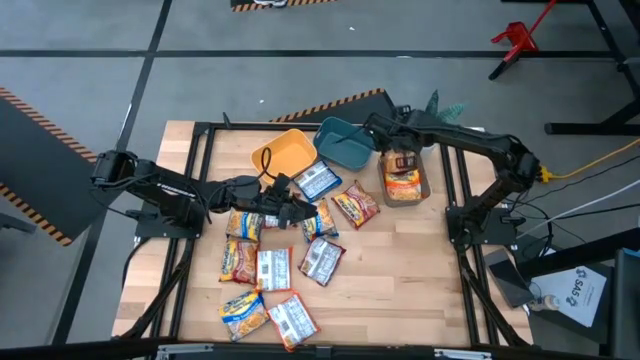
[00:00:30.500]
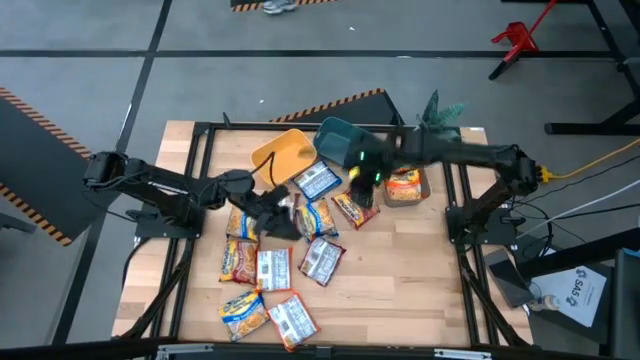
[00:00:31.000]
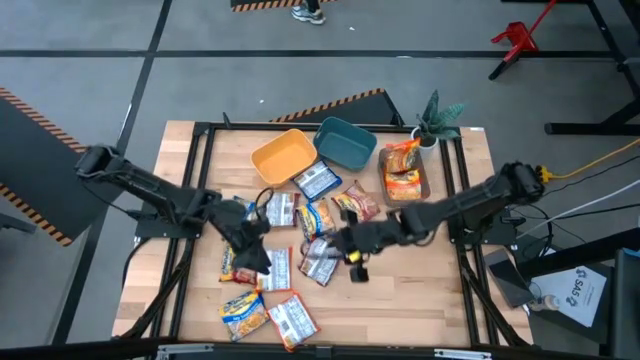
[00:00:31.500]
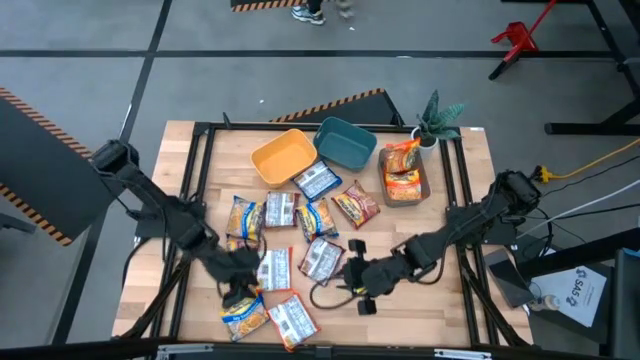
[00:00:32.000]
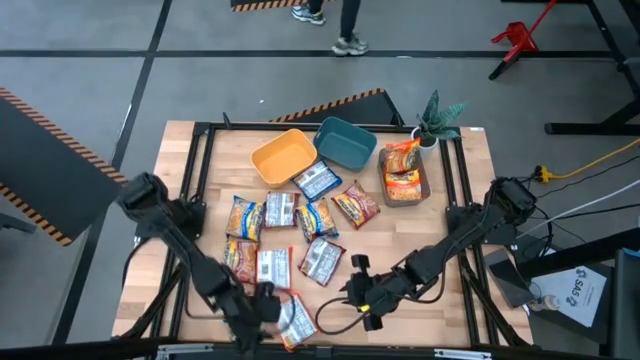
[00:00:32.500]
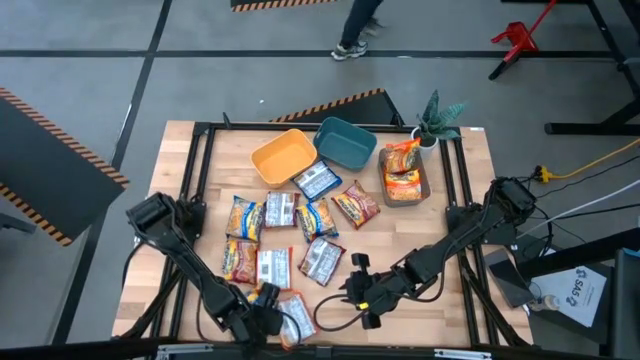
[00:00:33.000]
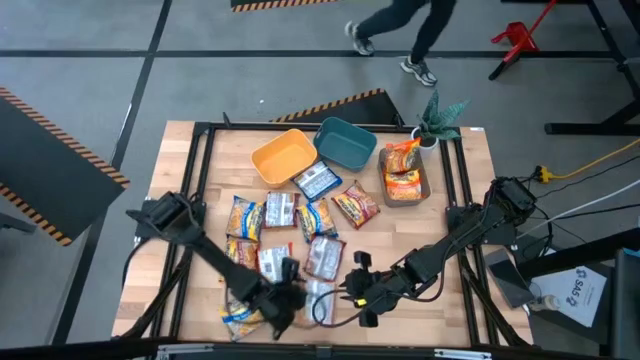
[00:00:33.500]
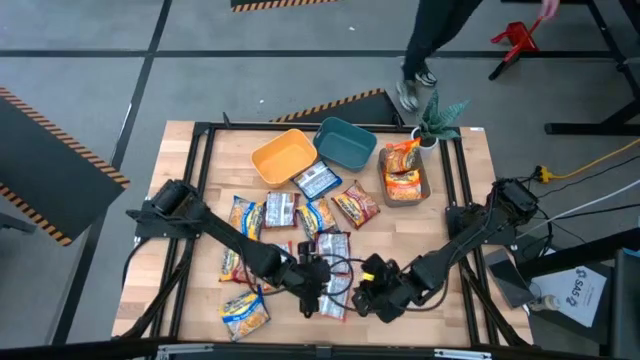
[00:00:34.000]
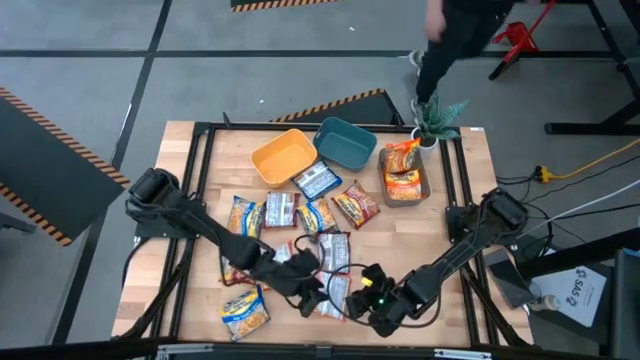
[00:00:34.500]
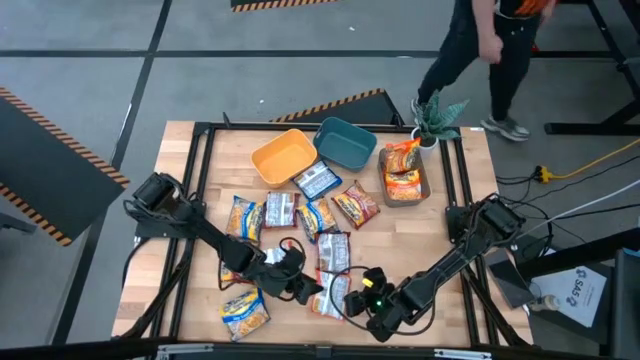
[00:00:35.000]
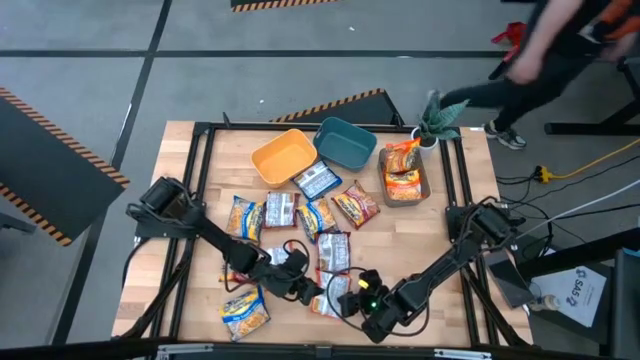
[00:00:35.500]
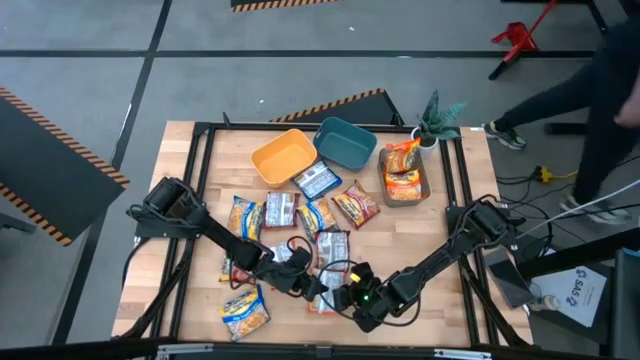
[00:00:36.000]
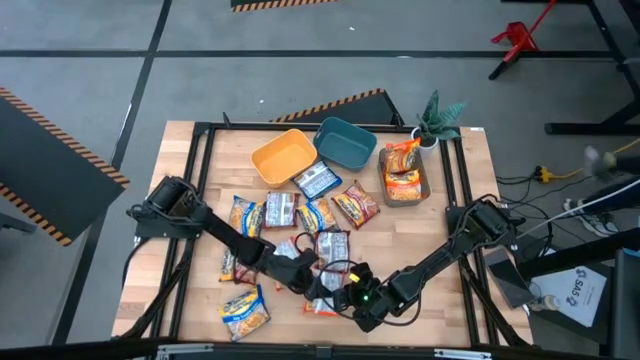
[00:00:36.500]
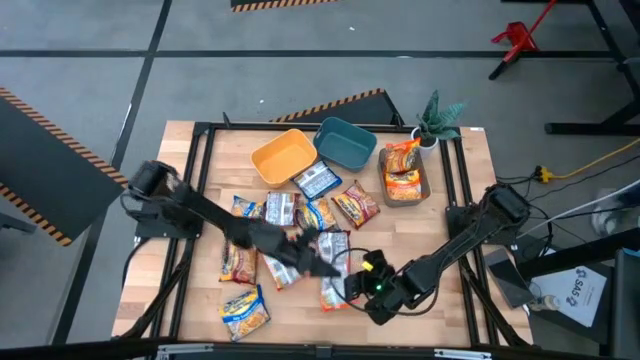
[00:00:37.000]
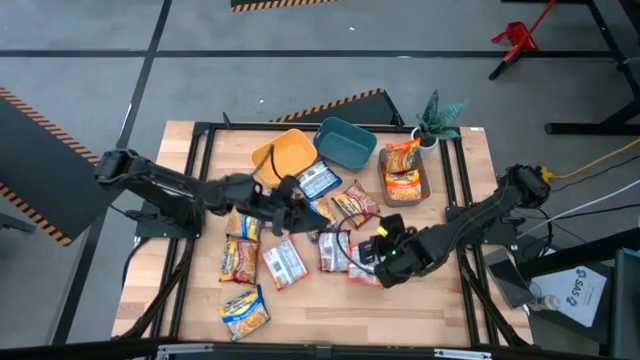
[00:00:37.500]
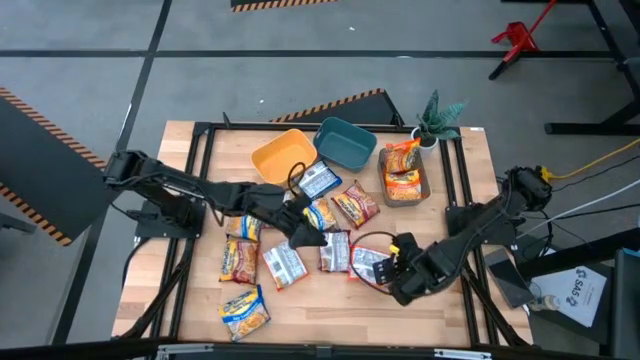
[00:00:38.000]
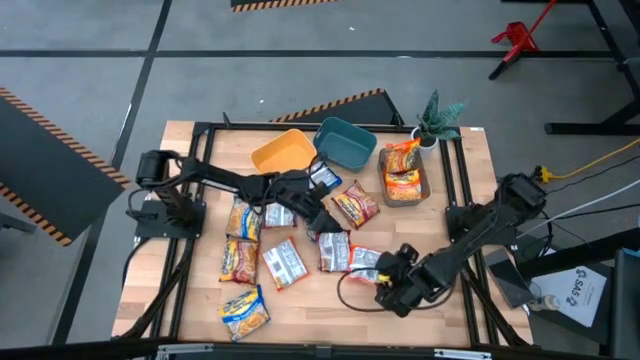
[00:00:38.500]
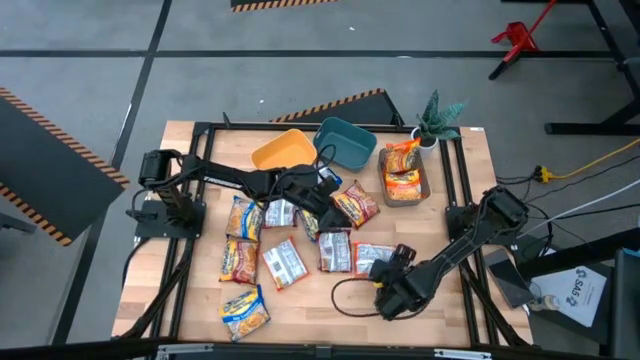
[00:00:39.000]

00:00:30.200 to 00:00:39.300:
Task: Sort Maruchan noodles
Put the bottom orange noodle pack into the black bin

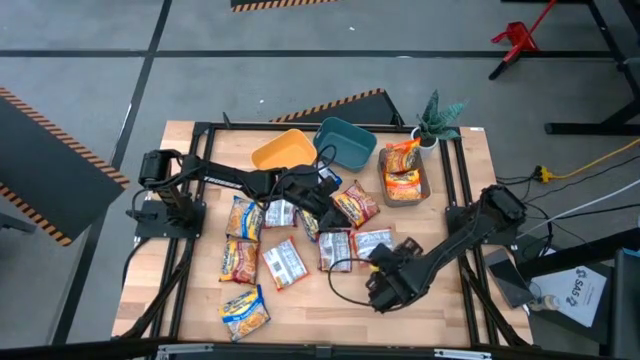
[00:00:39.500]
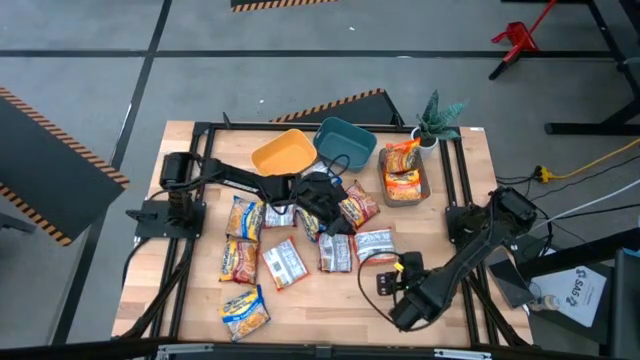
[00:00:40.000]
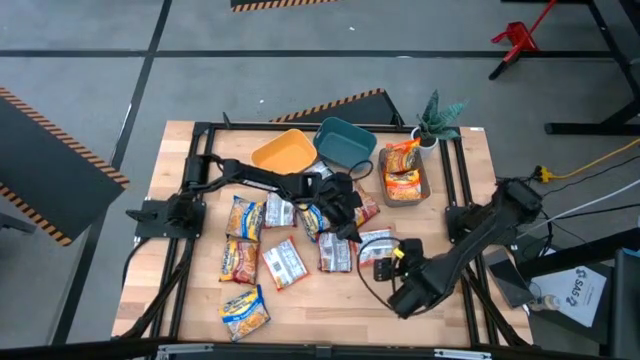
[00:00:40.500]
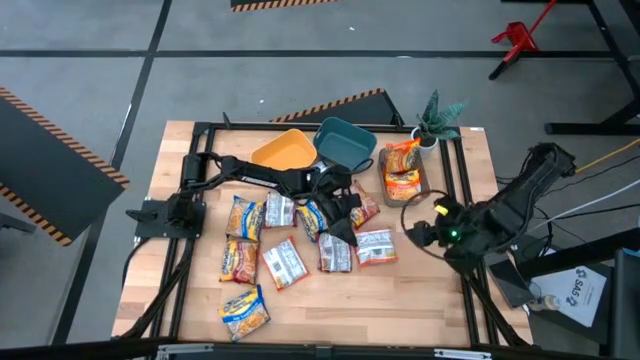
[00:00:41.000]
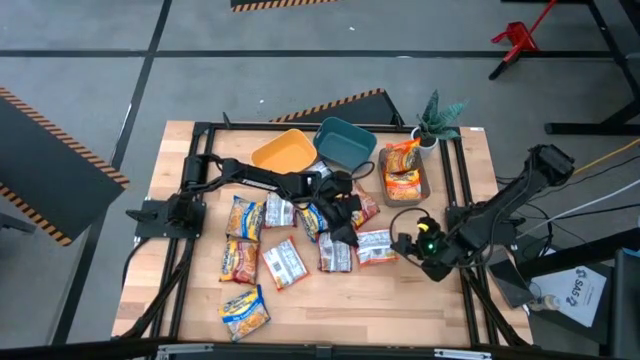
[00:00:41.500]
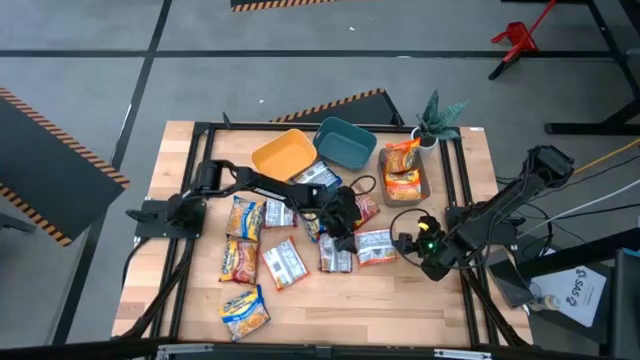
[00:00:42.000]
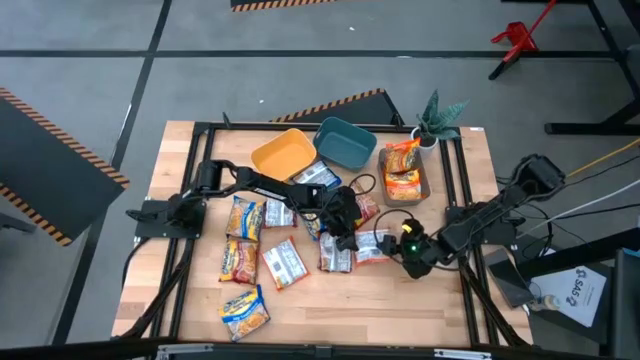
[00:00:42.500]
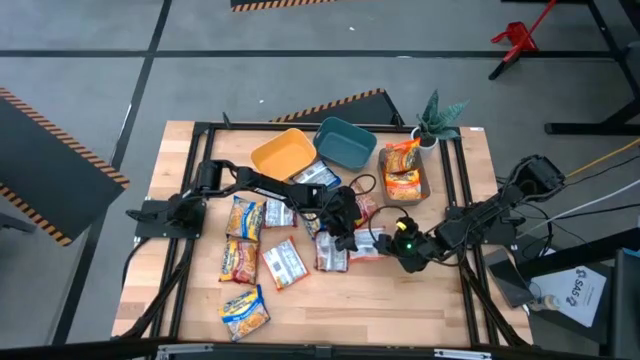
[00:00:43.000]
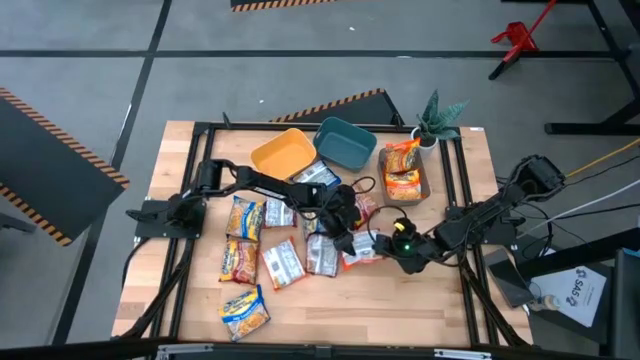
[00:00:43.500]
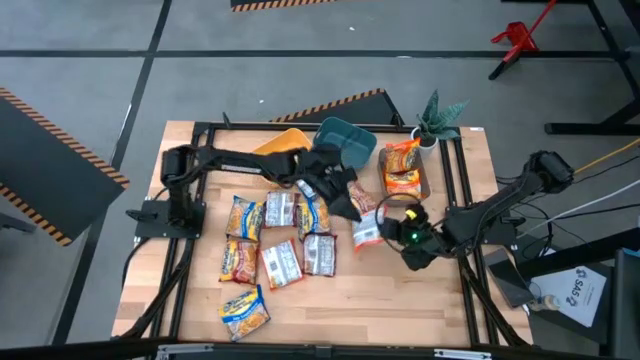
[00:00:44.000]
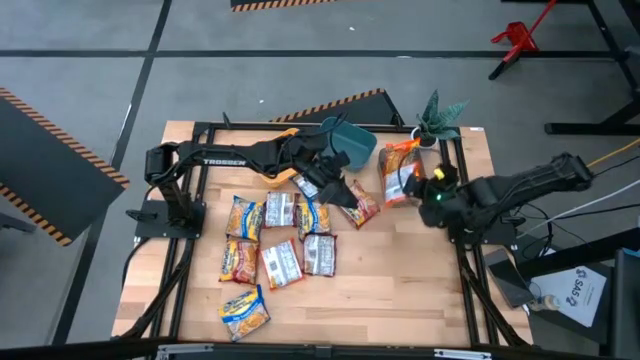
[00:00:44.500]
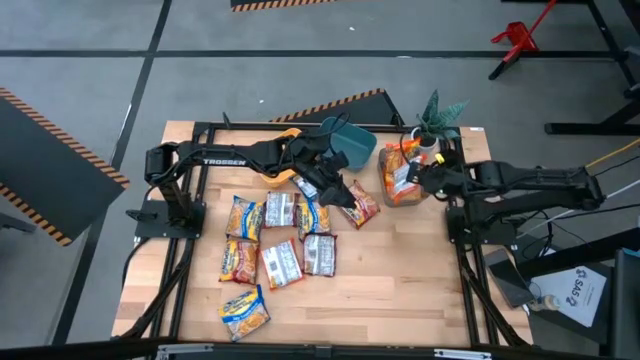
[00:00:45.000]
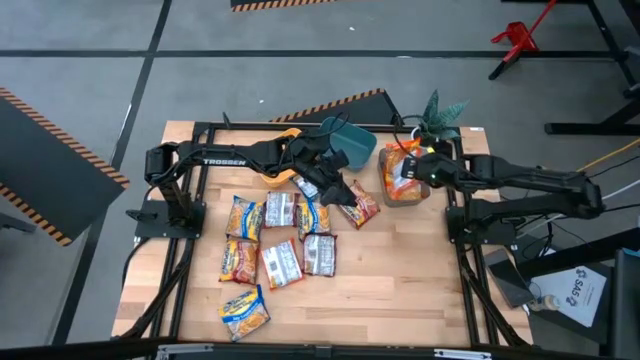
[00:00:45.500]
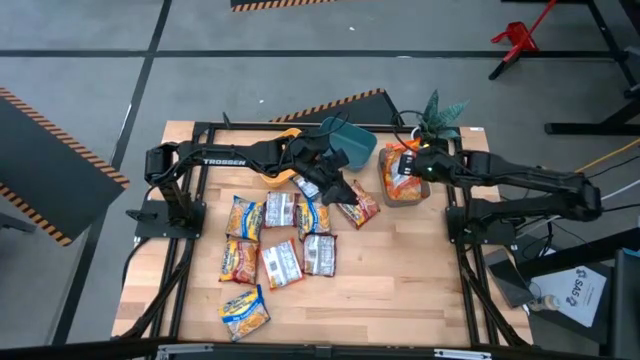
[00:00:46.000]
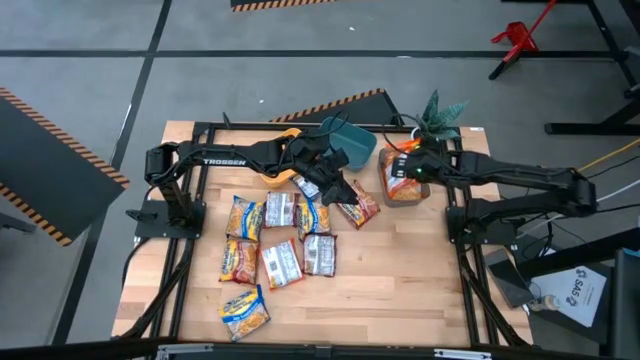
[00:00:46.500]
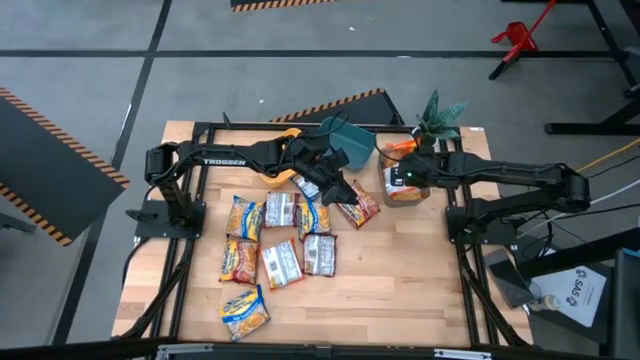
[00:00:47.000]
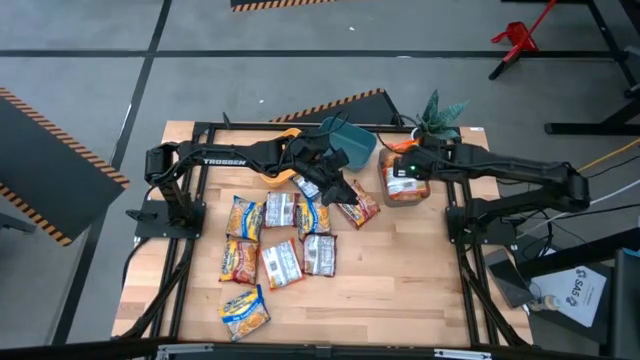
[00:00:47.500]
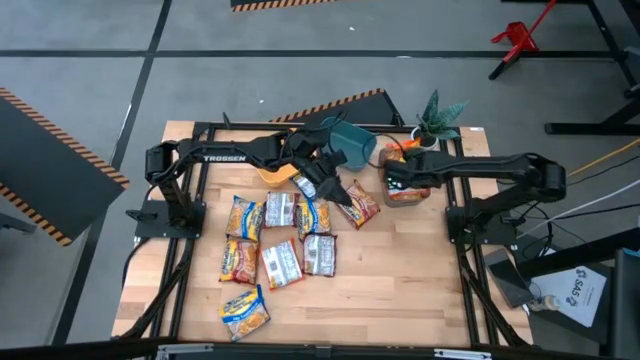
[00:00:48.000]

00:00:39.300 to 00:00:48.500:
Put the right orange noodle pack into the black bin

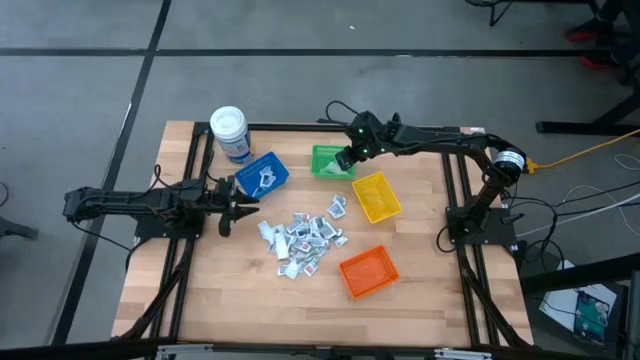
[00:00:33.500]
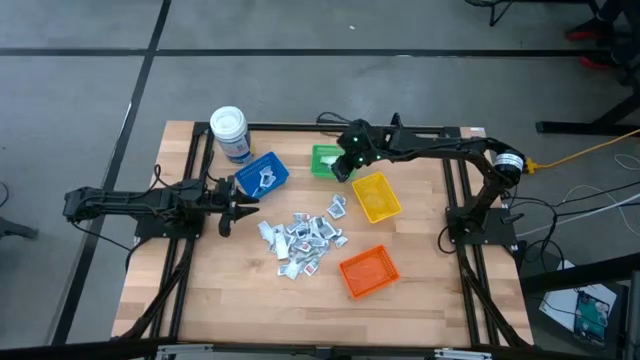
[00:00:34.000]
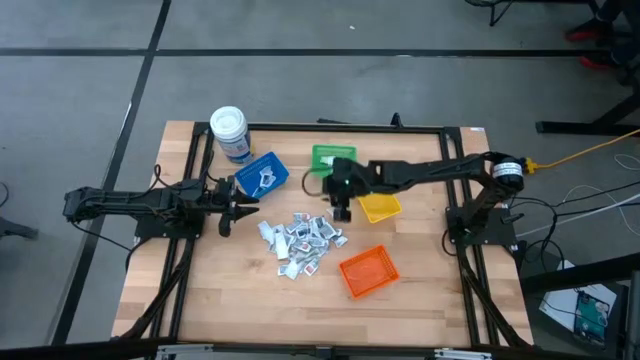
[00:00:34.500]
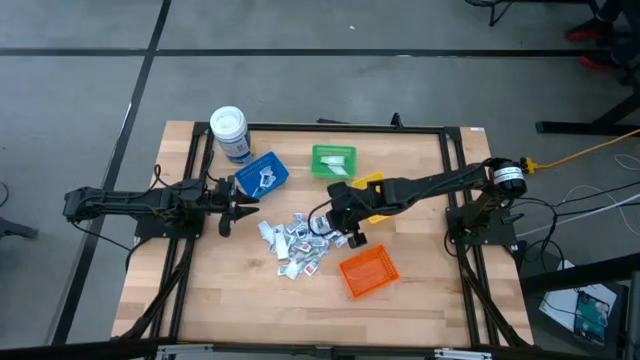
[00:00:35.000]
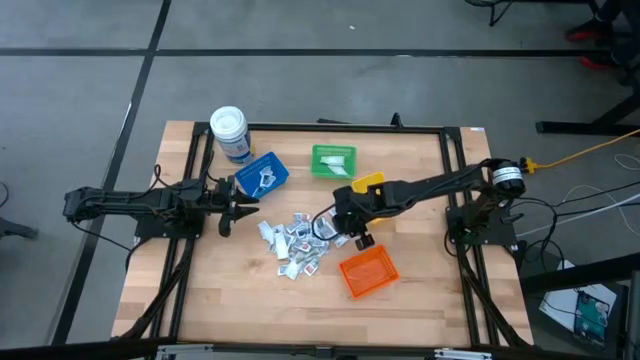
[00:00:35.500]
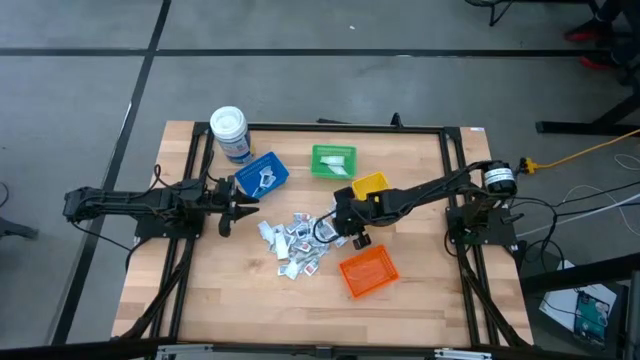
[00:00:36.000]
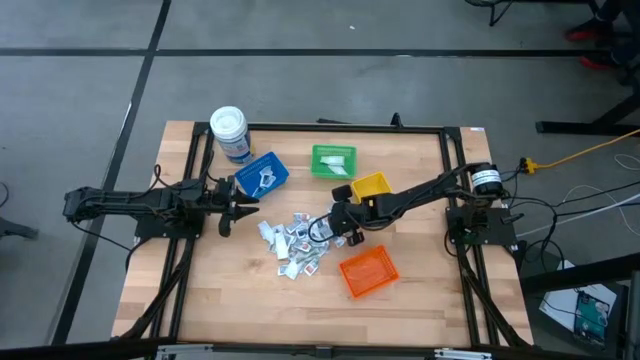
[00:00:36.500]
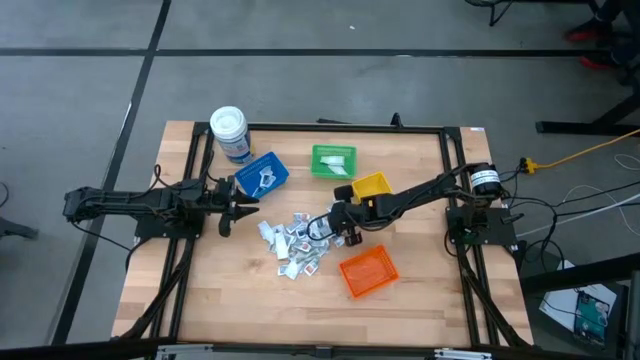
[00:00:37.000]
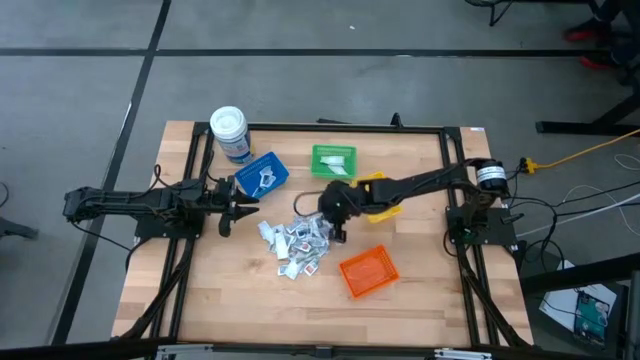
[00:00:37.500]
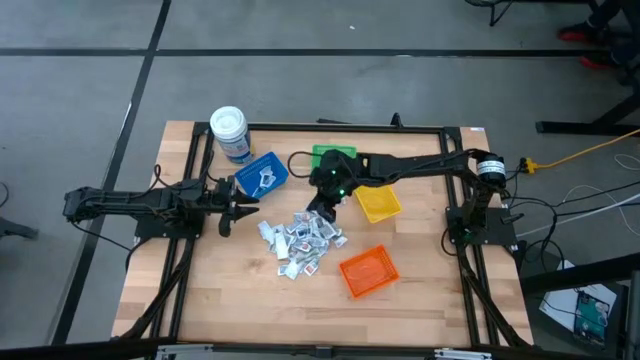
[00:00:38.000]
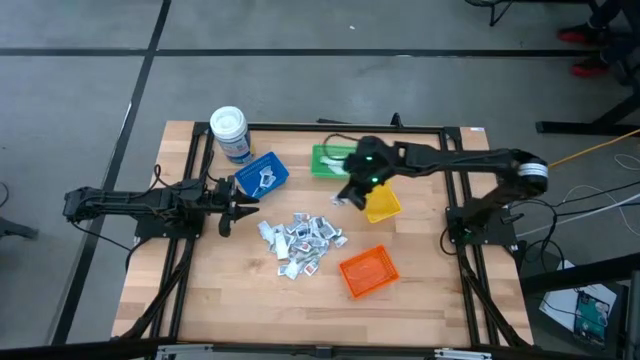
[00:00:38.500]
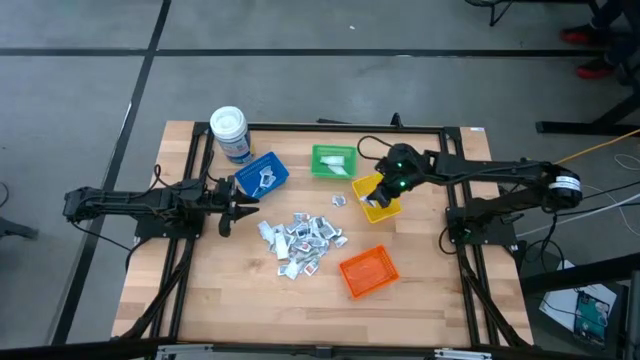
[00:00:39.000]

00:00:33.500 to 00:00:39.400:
Task: Pick & Place First Aid Supplies
Put the white towelette pack into the yellow bin
